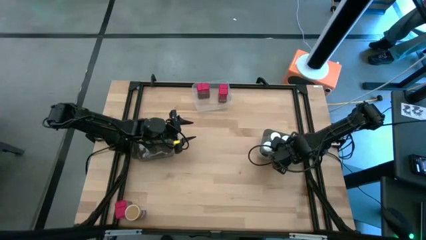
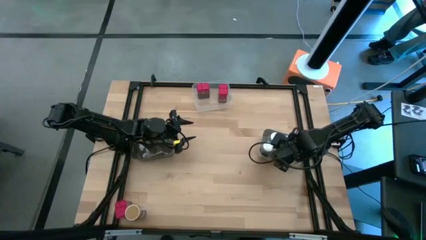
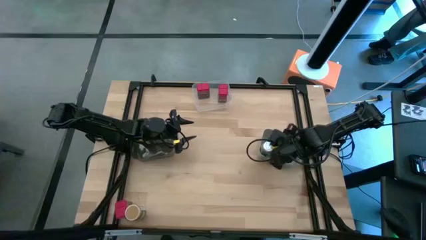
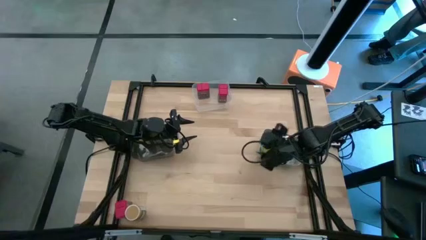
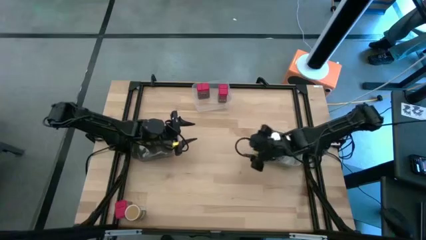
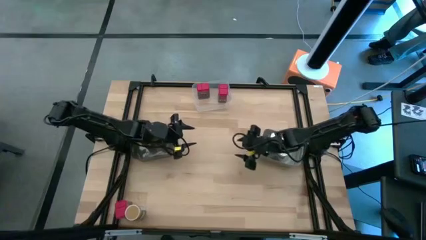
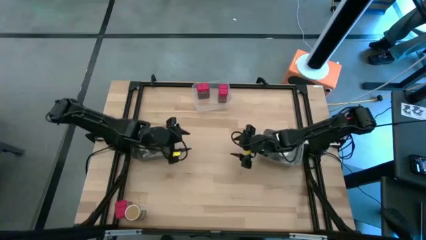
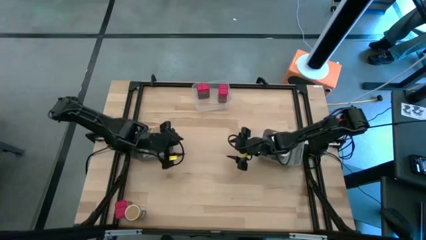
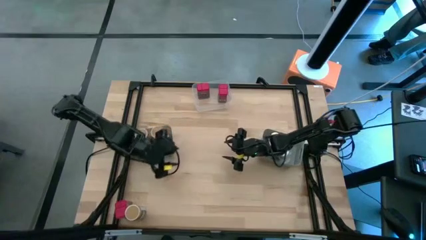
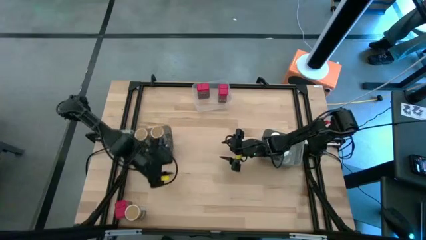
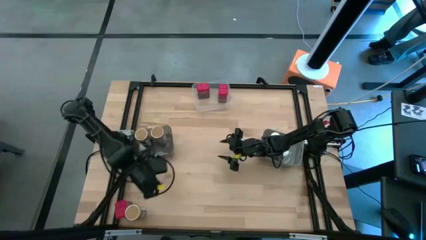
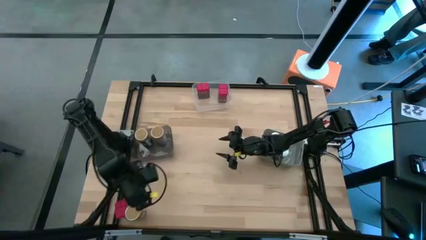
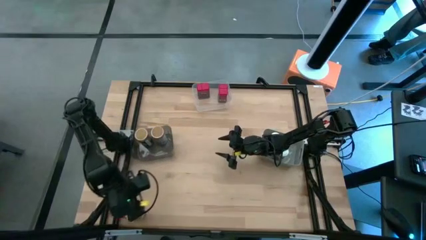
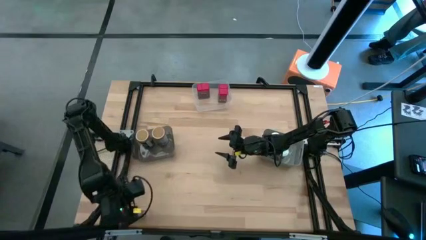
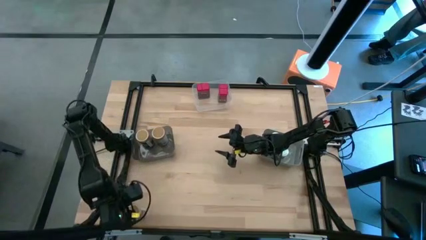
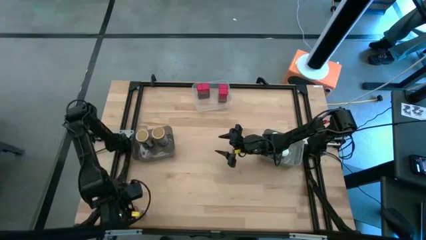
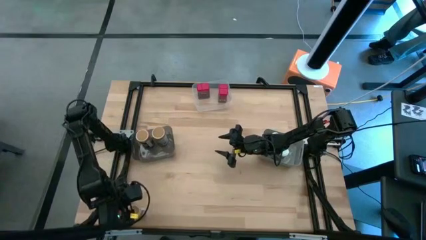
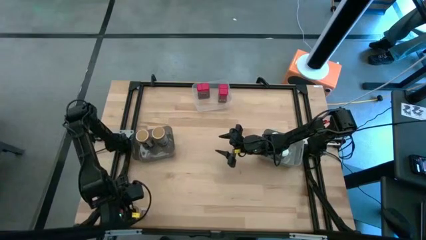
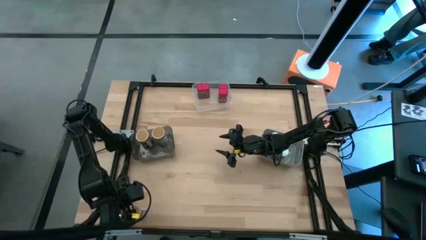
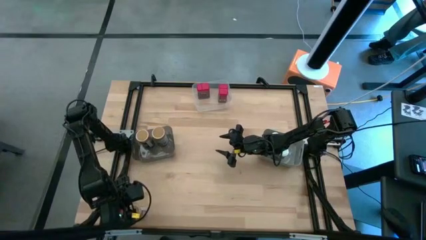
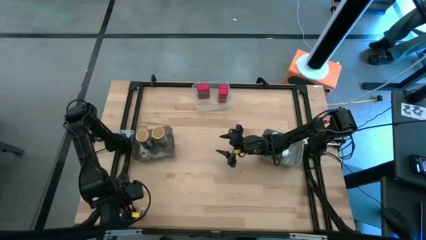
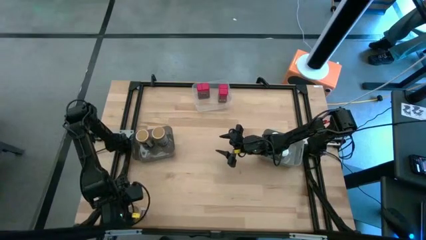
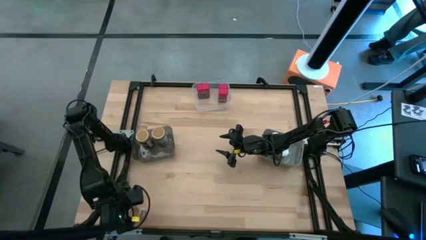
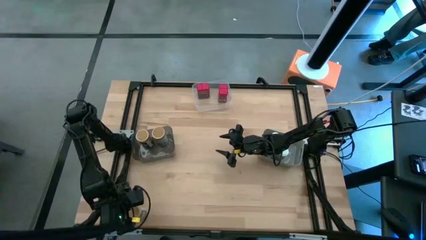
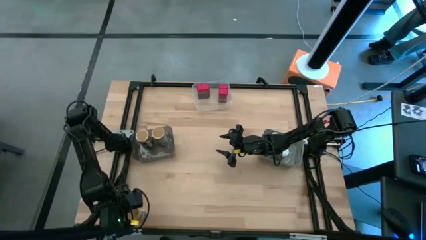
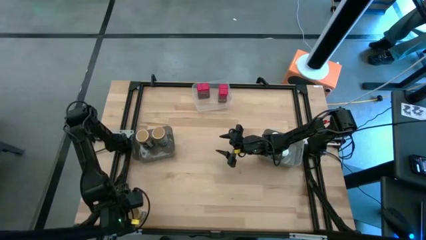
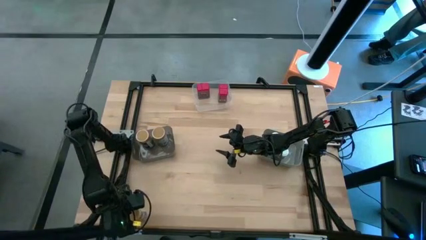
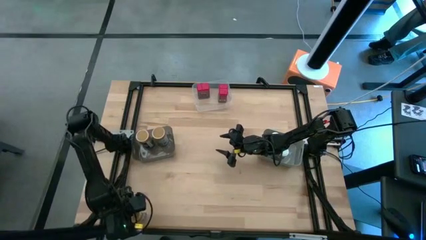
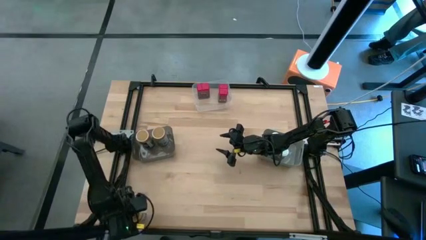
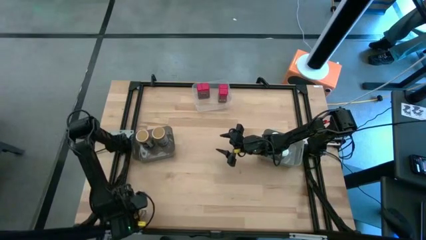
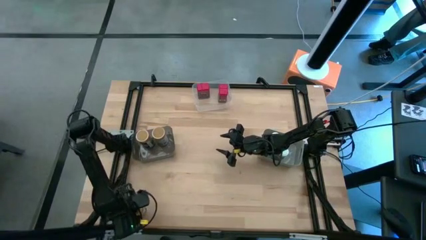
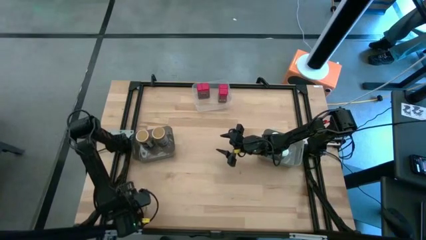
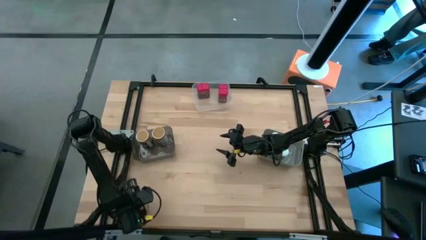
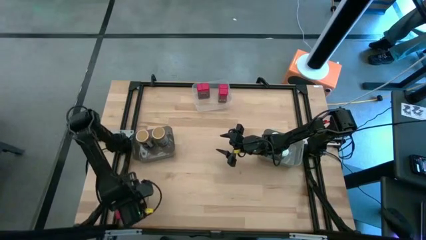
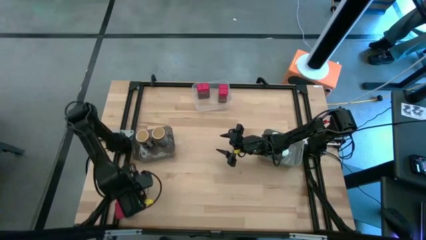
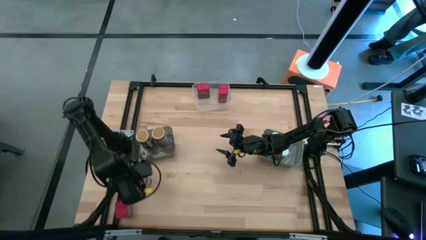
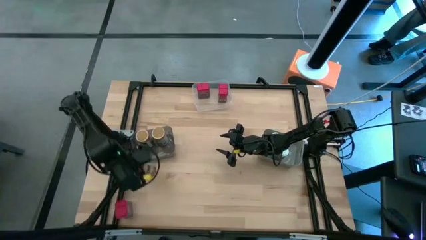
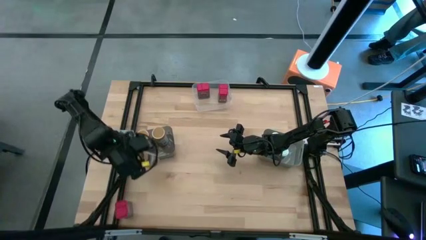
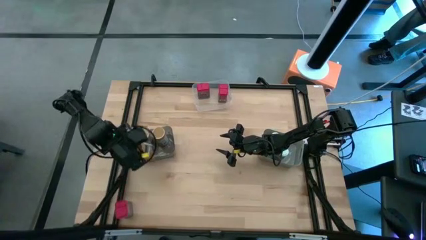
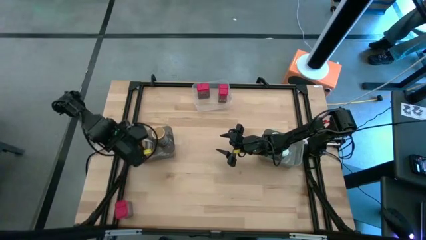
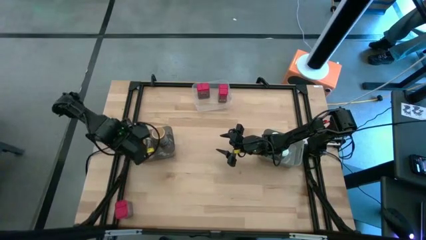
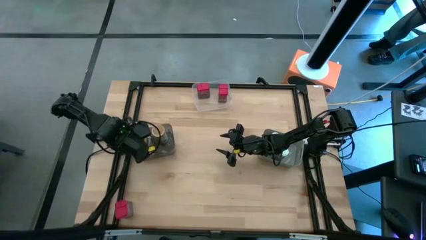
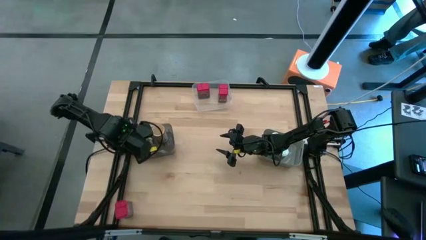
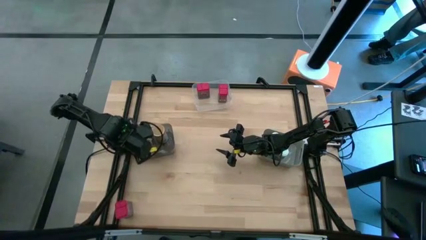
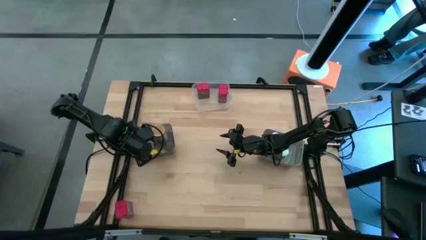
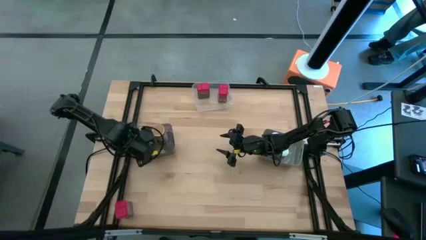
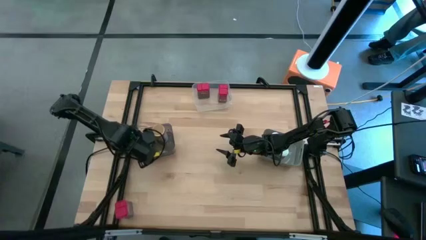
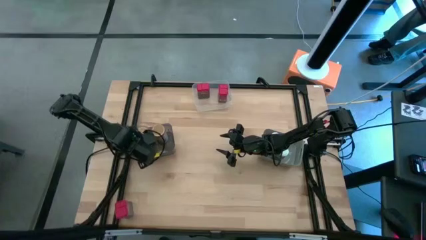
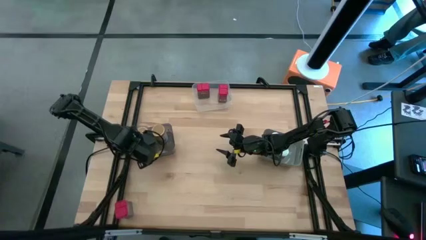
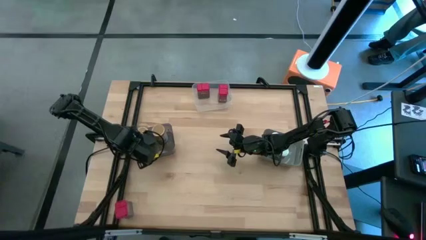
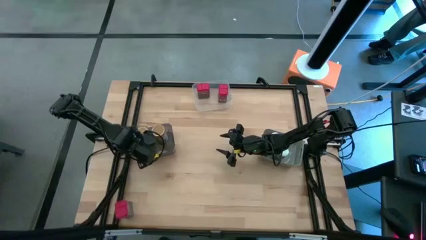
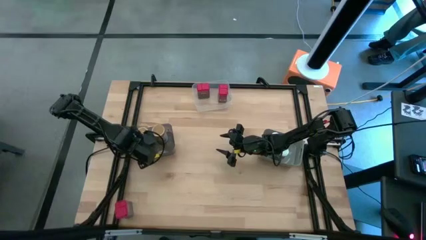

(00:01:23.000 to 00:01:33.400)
Task: Sort spices by type
Put the brown spice bottle into the black bin

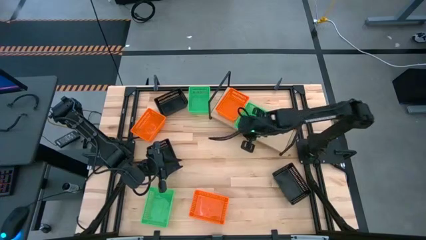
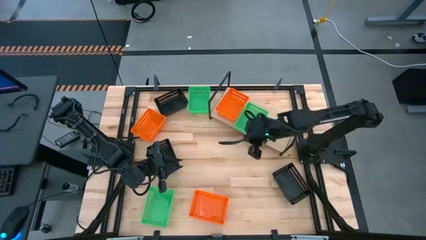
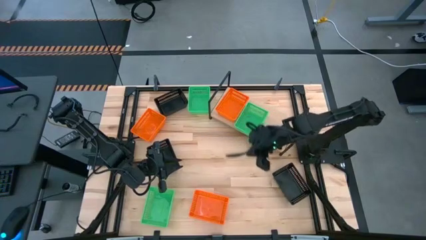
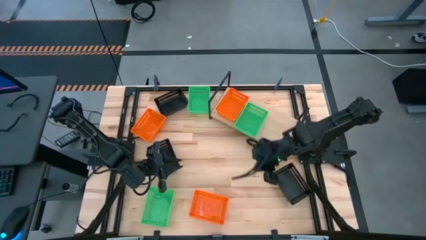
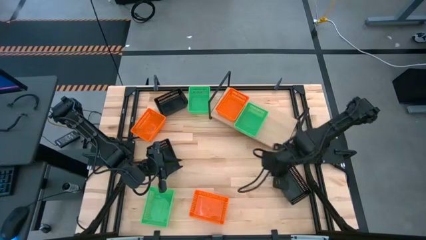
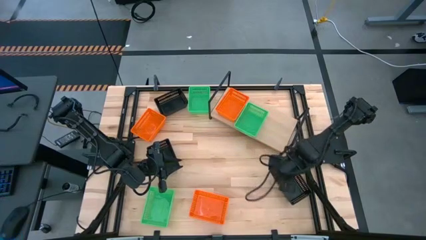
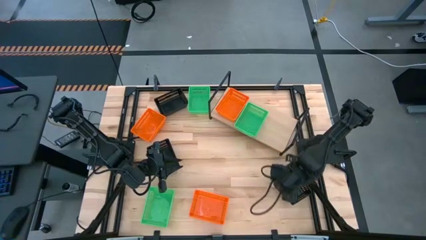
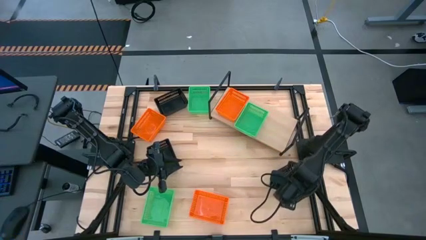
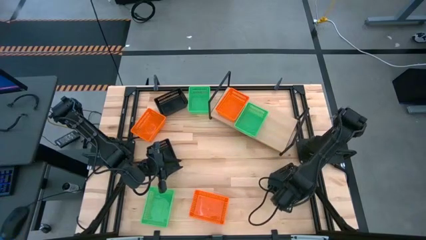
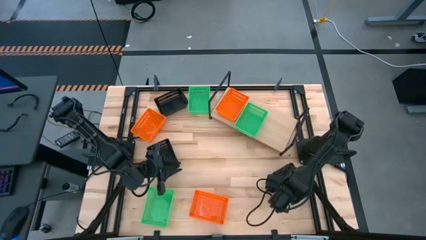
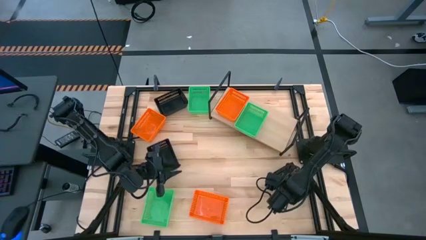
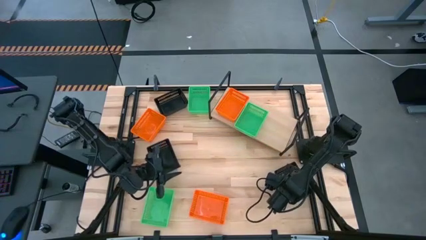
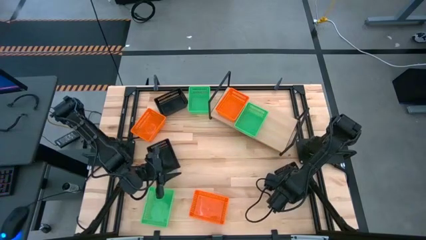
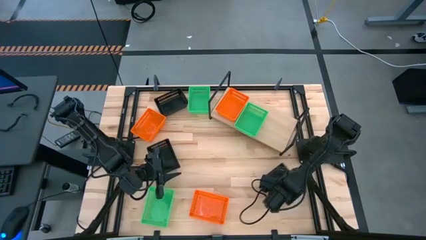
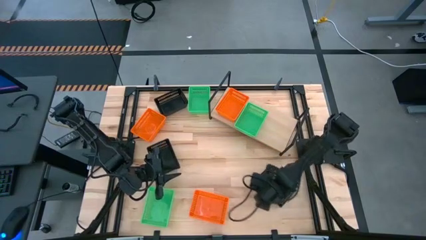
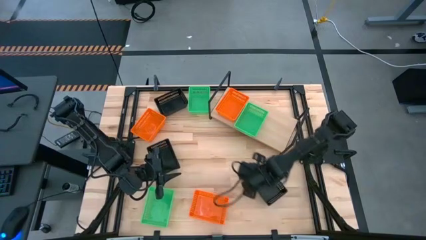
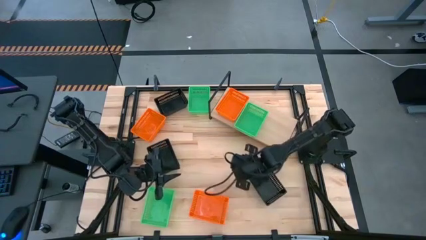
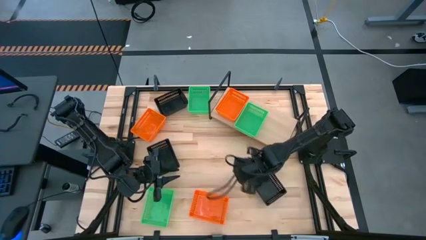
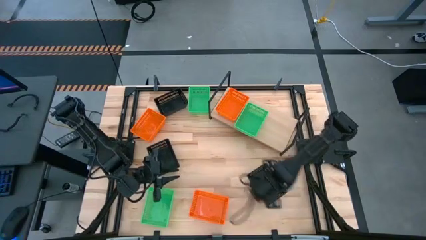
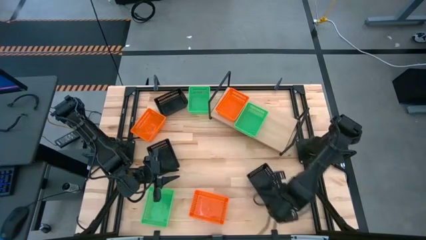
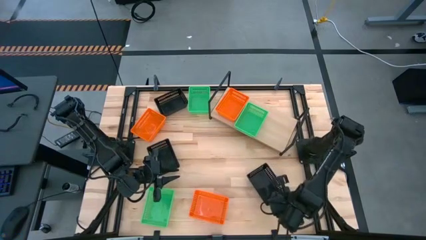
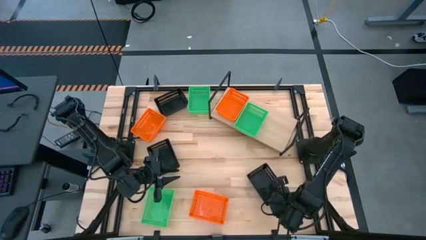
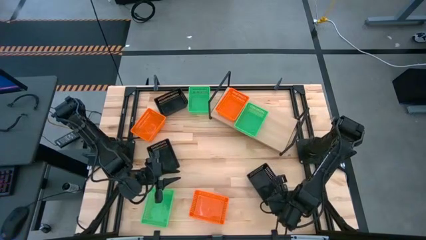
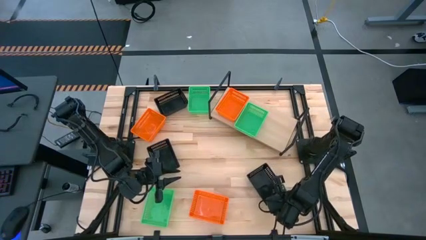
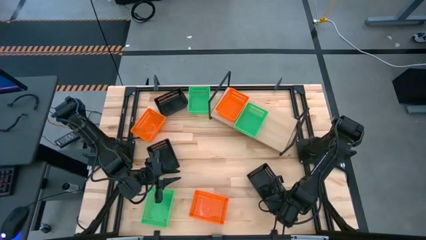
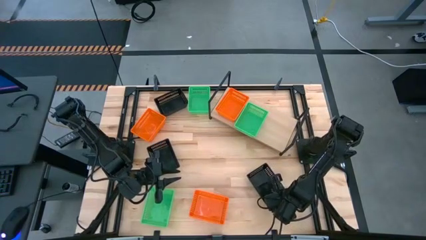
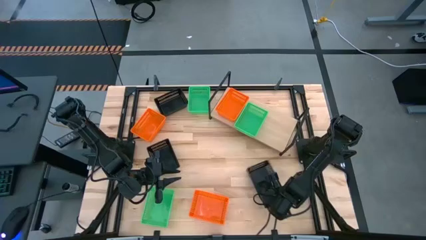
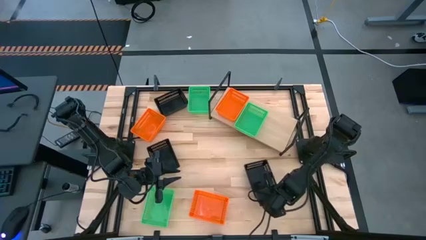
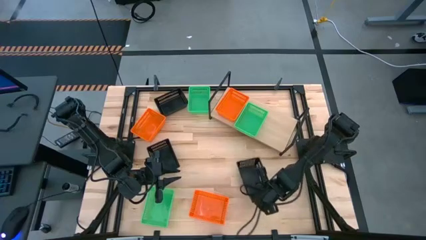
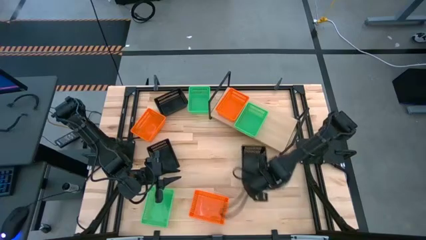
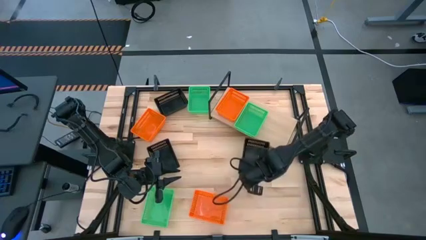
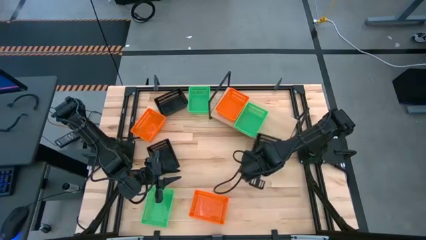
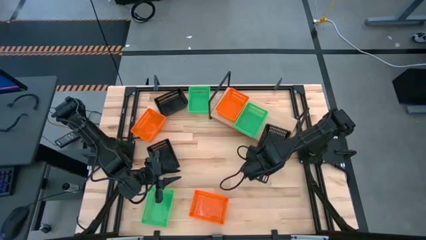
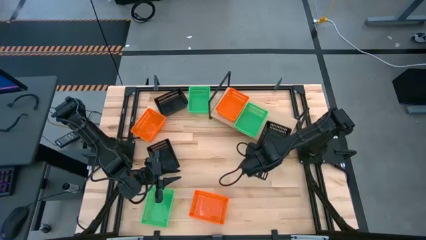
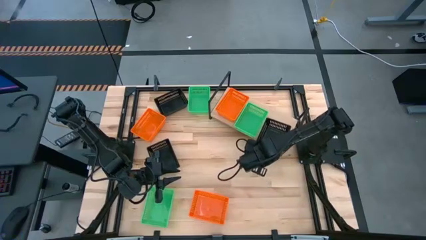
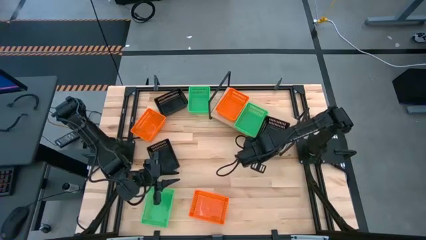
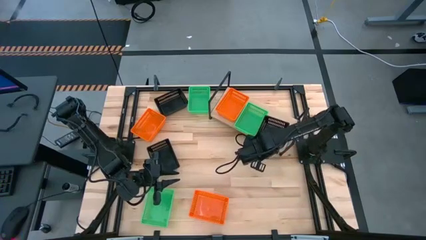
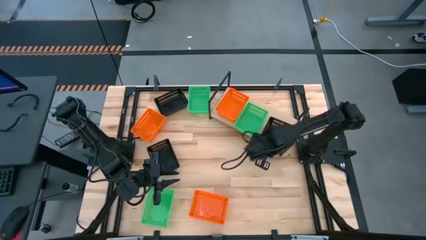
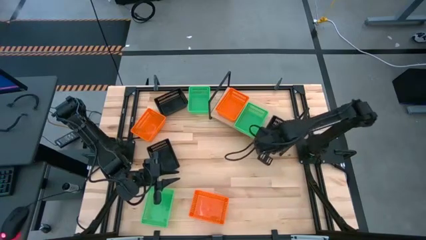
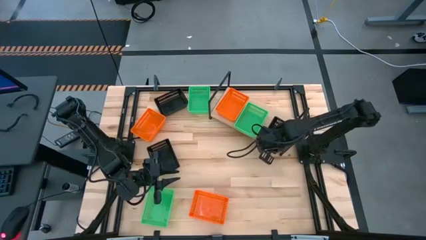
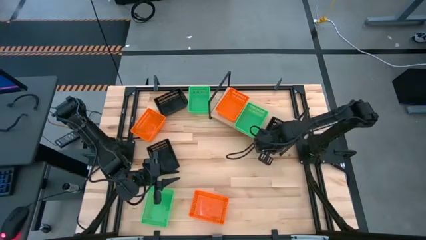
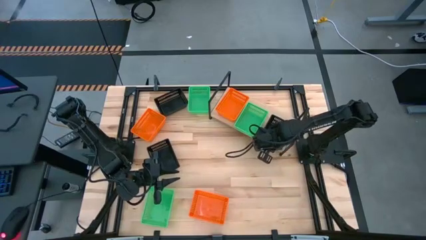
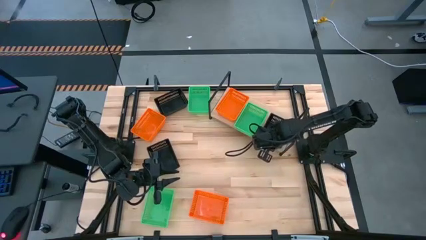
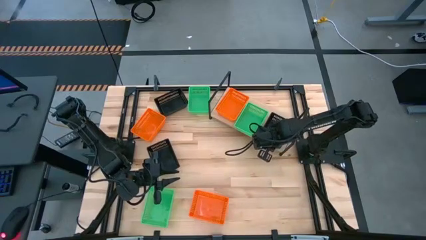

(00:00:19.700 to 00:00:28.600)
Task: Stack baskets on shelf by color
Put the bottom right black basket on the shelf
